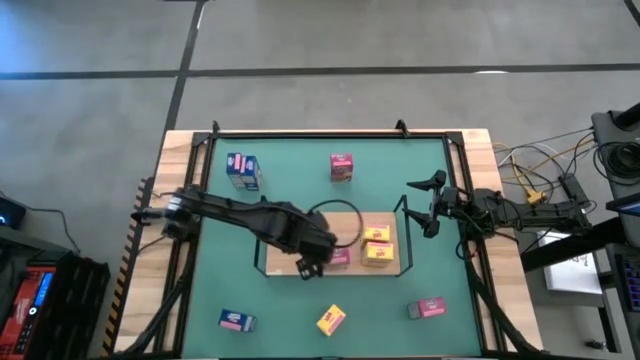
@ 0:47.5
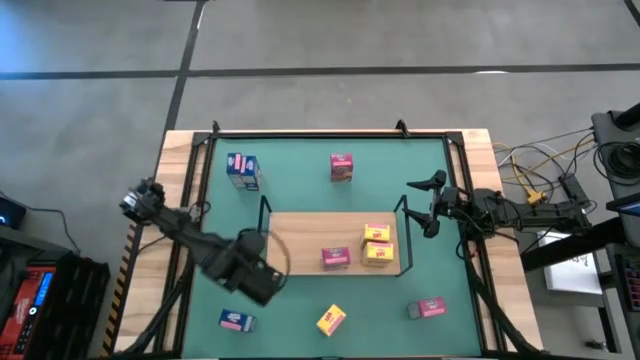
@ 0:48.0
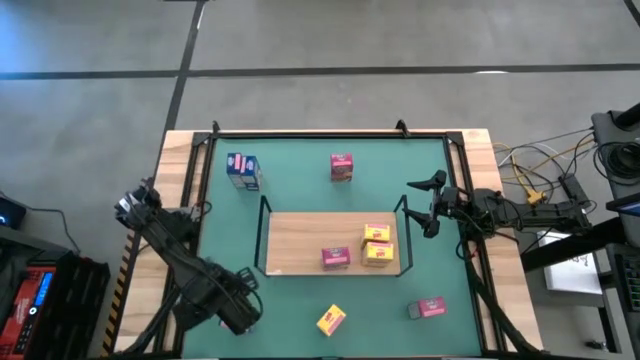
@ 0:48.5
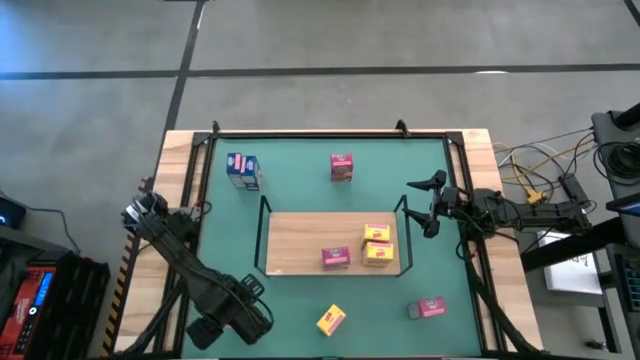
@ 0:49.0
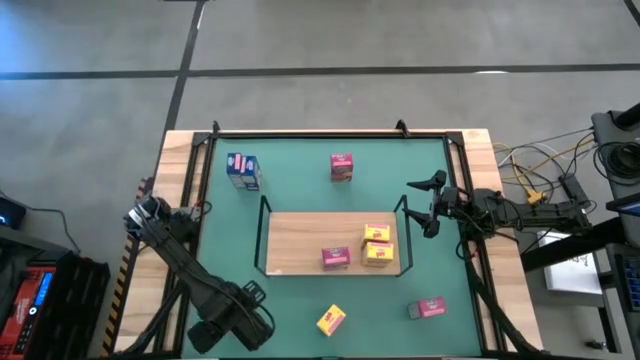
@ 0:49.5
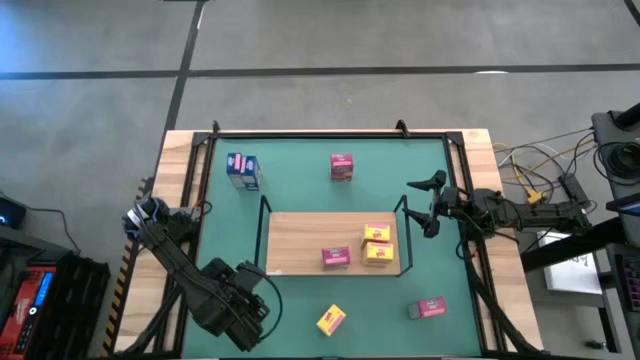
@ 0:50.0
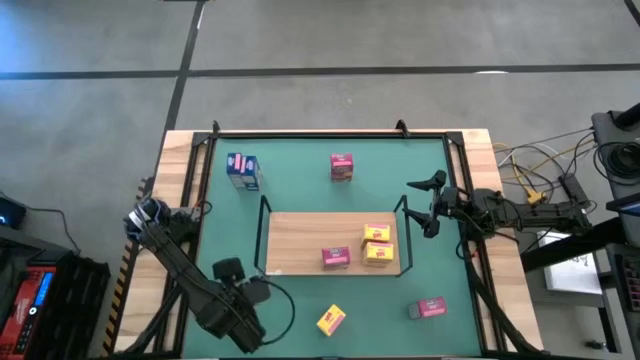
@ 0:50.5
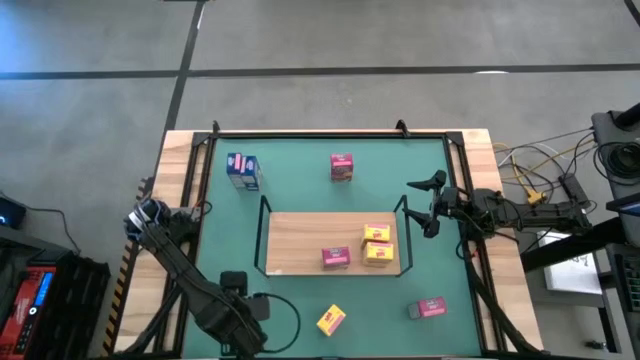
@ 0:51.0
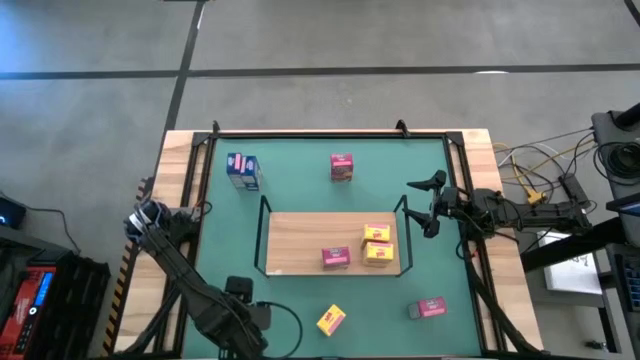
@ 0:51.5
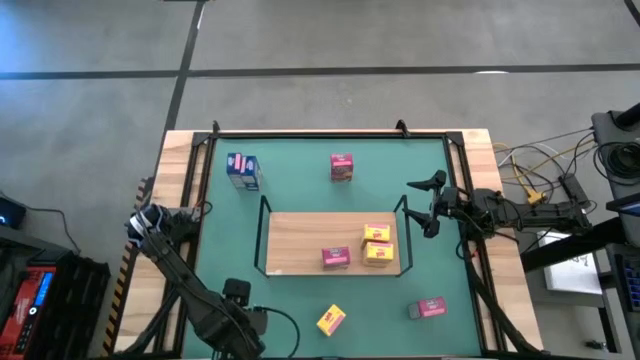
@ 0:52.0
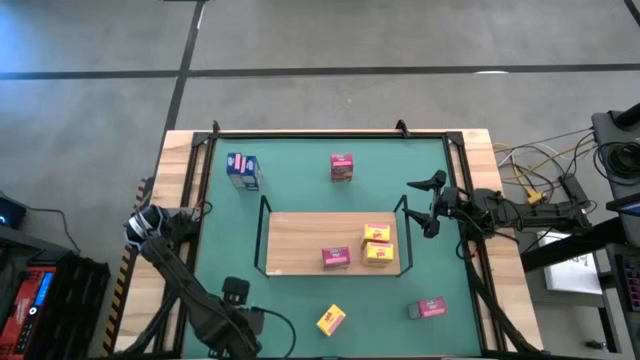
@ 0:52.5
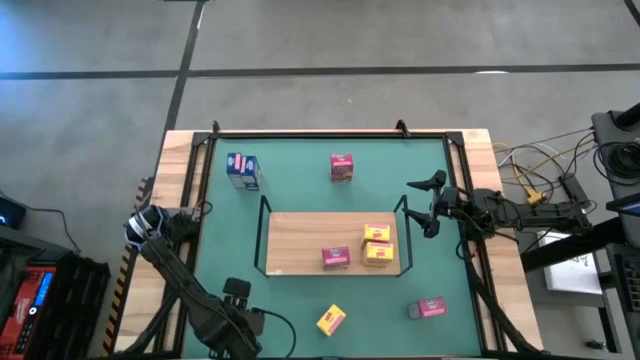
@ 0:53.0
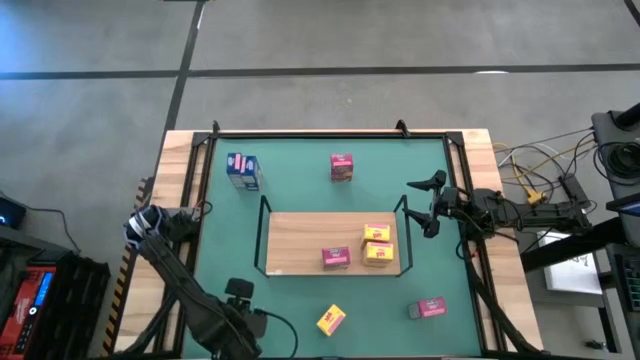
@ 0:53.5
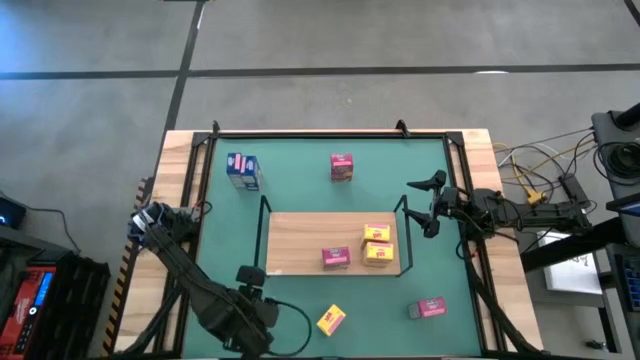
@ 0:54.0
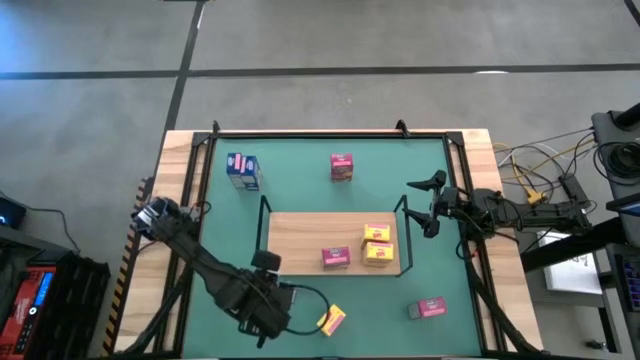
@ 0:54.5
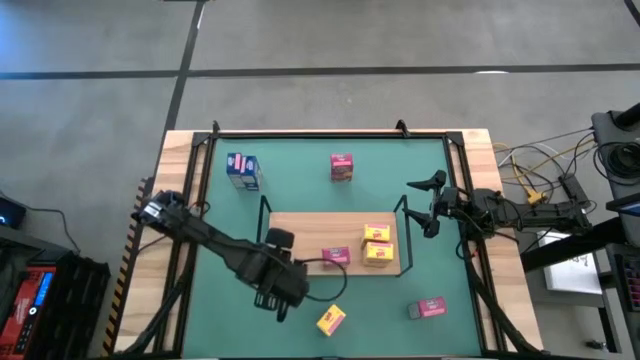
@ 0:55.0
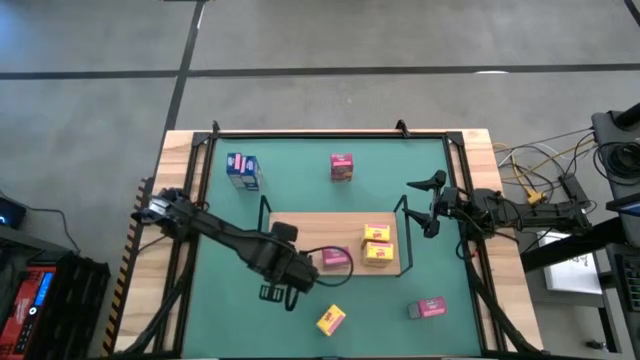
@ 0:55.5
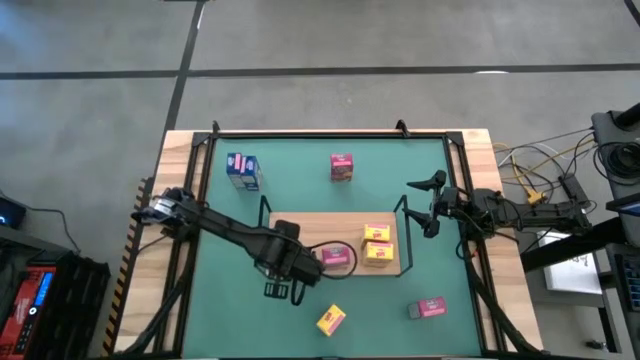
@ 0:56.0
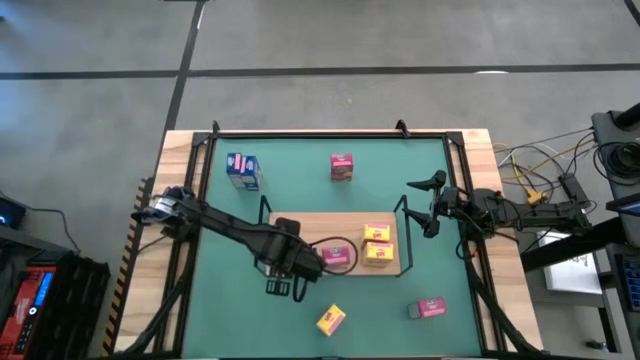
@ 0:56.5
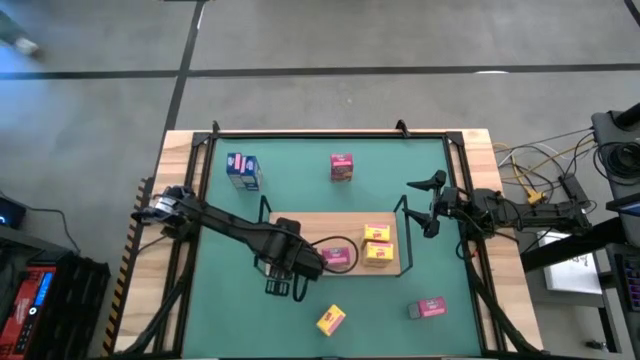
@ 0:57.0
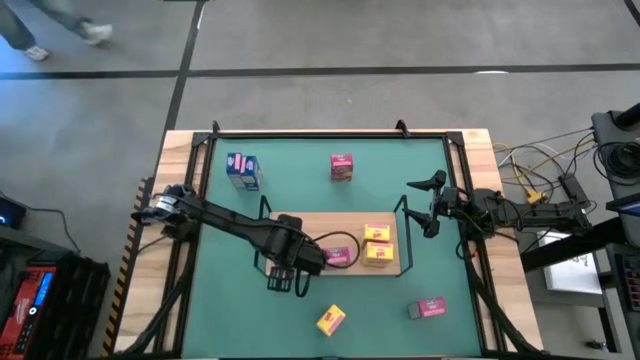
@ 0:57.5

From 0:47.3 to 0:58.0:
Task: Stack cereal on shelf
Put the bottom blue cereal box on the shelf

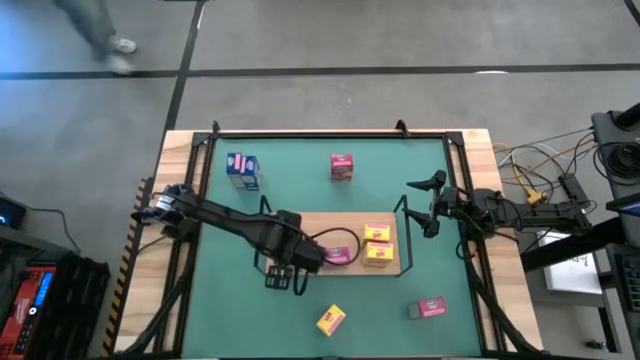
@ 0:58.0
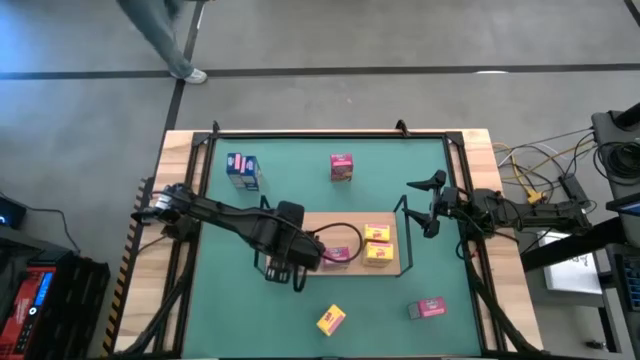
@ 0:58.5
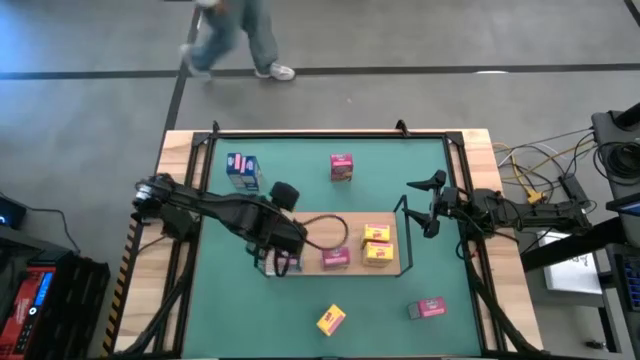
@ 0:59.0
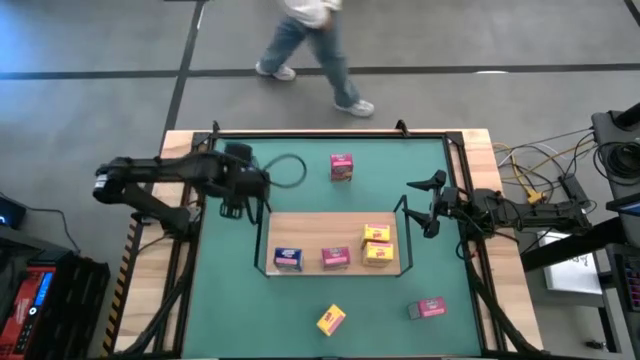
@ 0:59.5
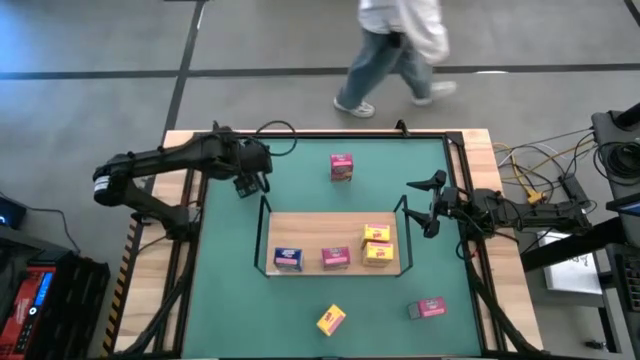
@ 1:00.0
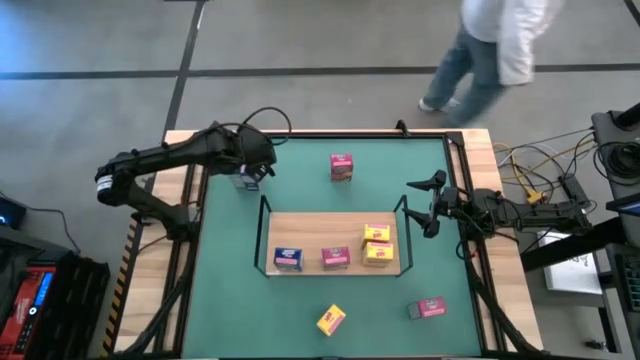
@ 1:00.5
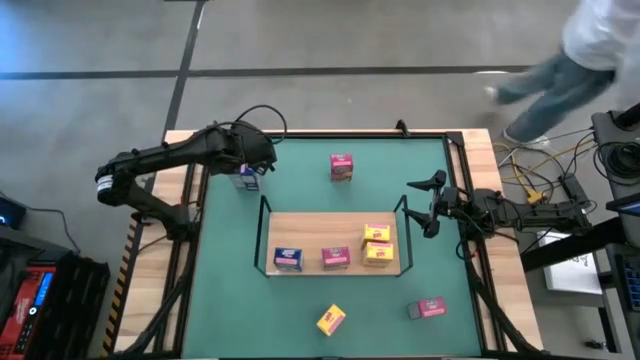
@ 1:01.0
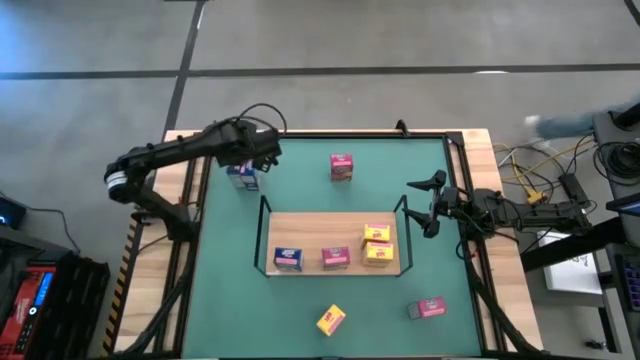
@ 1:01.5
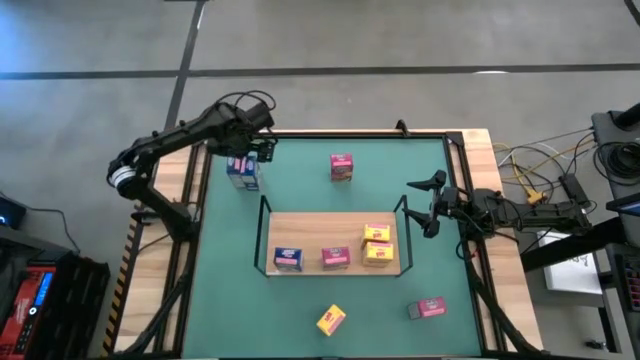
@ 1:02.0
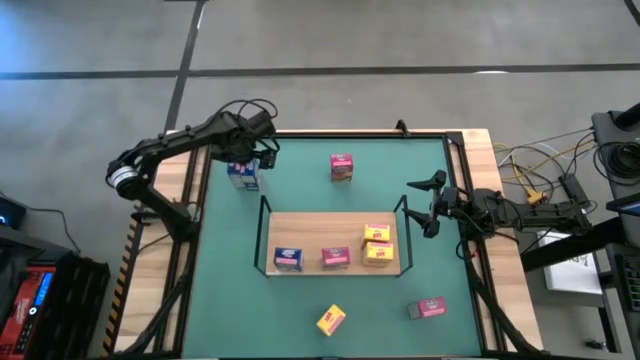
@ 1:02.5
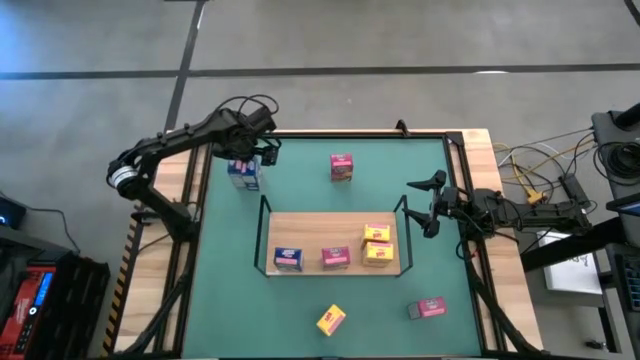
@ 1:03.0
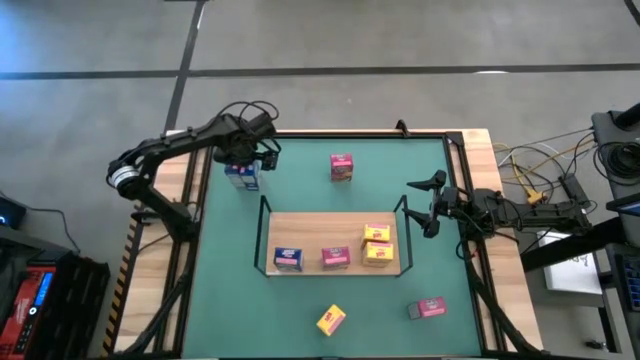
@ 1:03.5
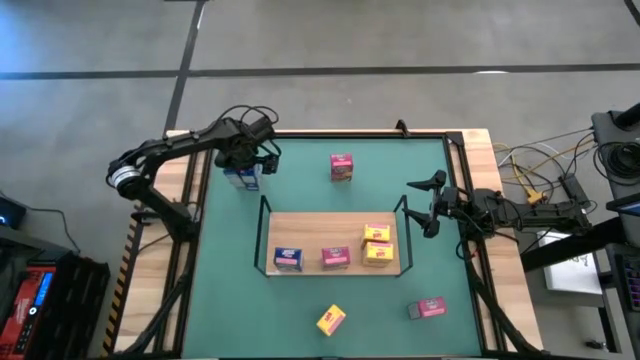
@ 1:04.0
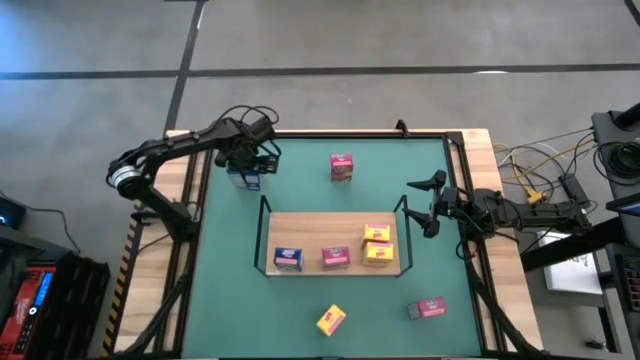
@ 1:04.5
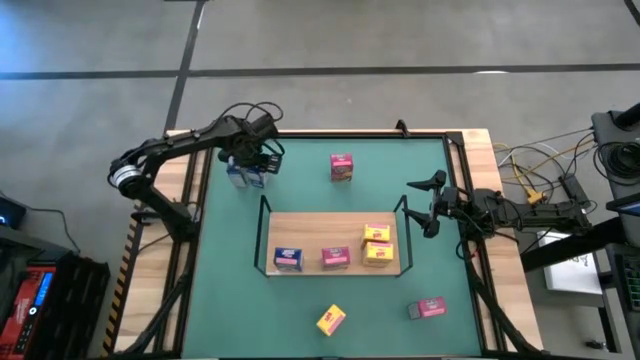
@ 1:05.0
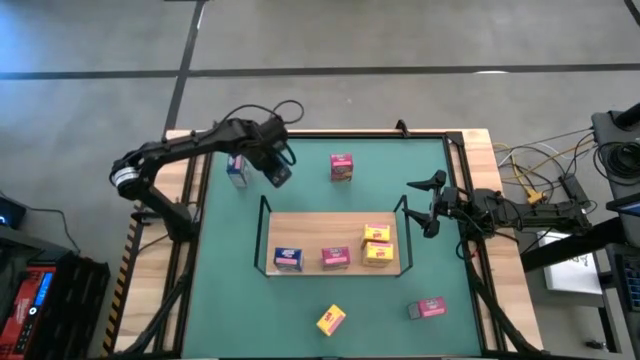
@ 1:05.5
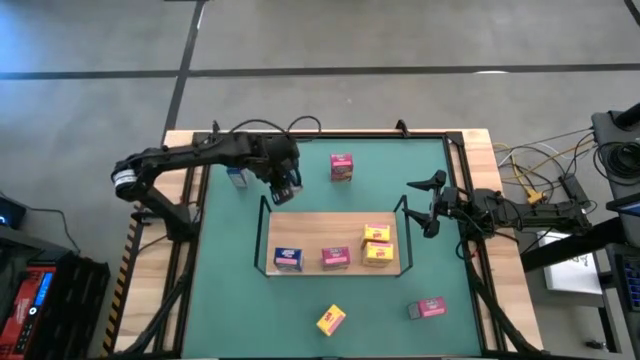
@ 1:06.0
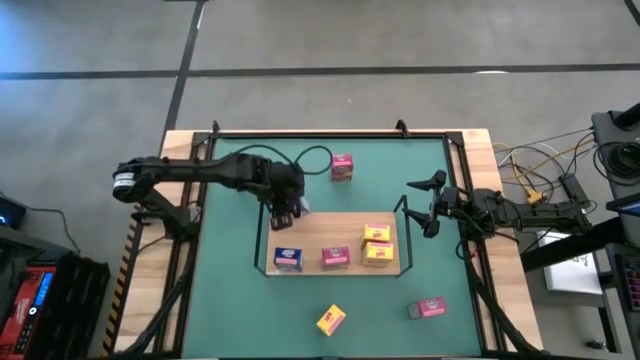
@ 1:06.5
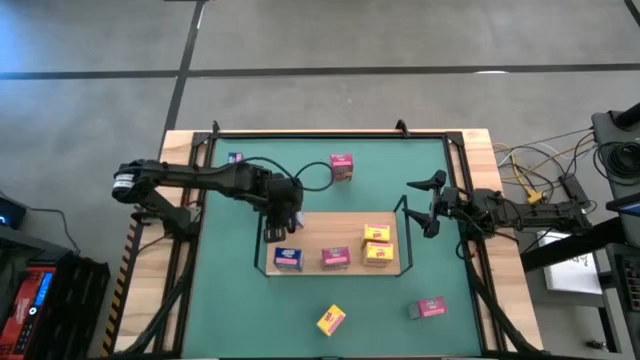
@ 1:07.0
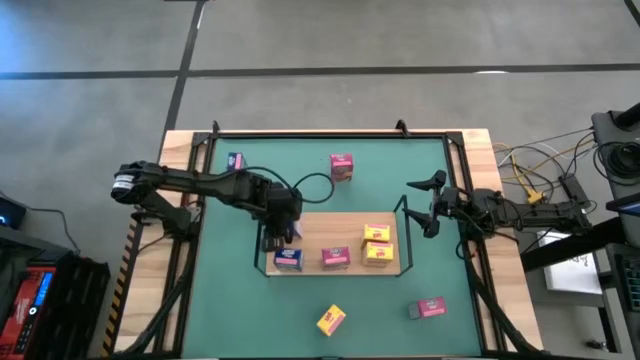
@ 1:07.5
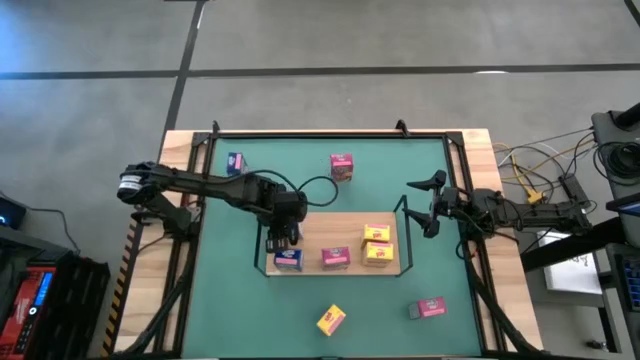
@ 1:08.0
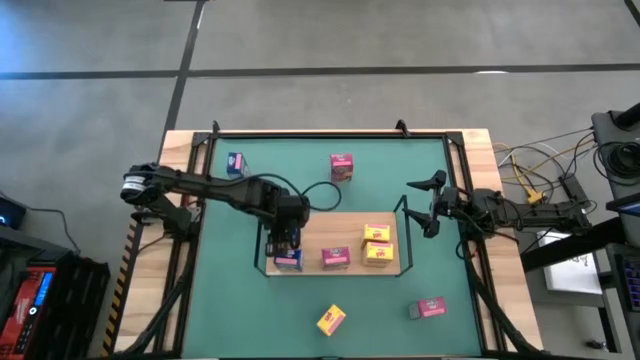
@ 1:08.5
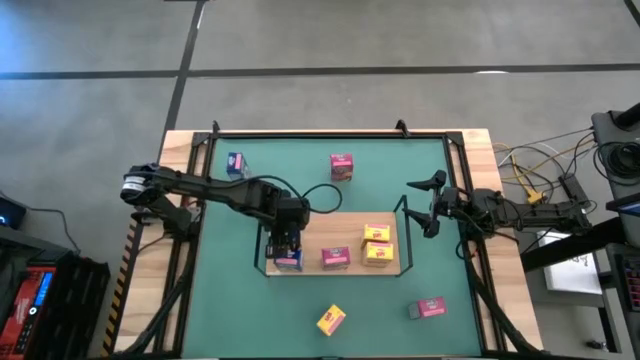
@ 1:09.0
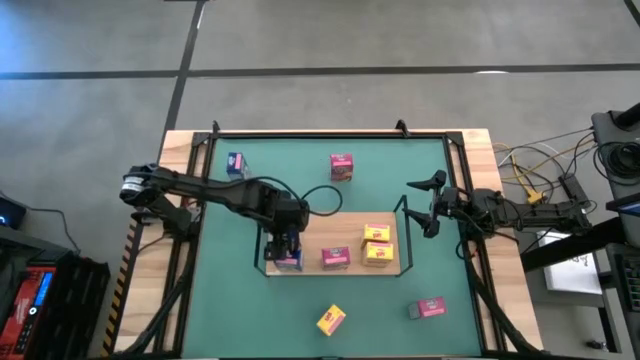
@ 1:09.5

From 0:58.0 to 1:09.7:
Put the right blue cereal box on the shelf aligned with the other blue cereal box
